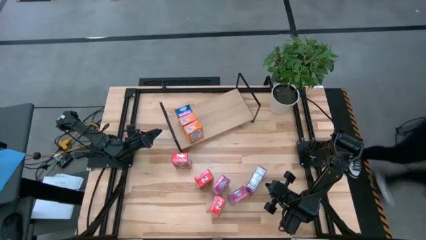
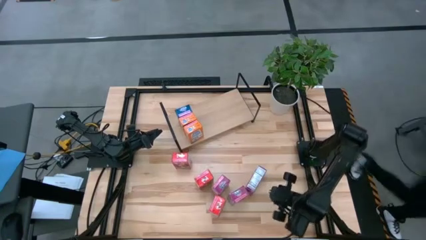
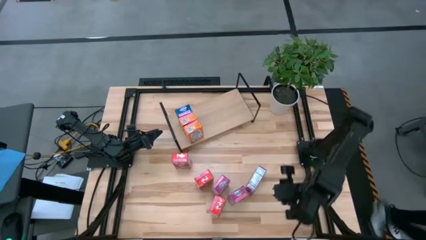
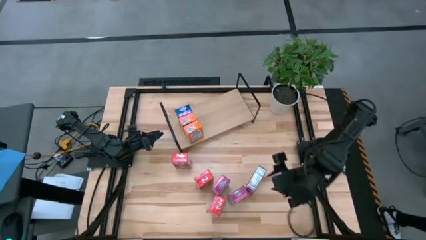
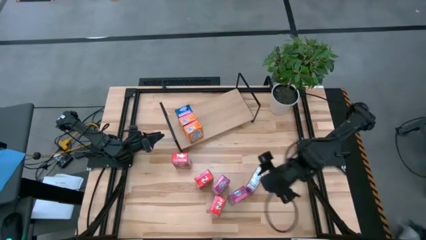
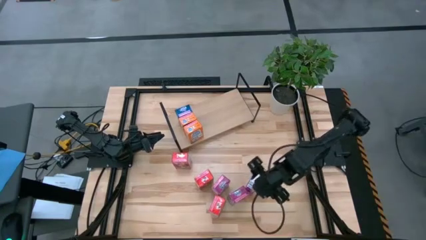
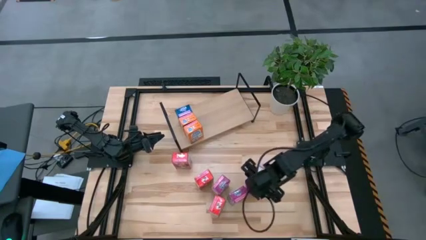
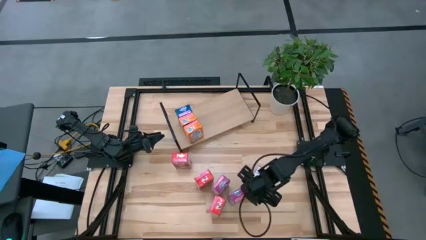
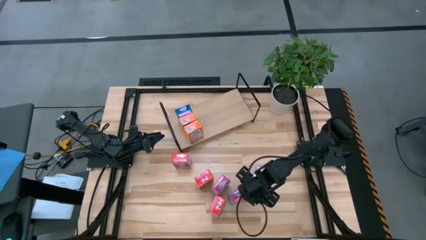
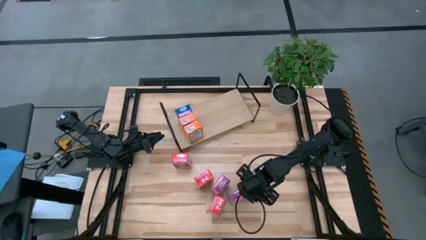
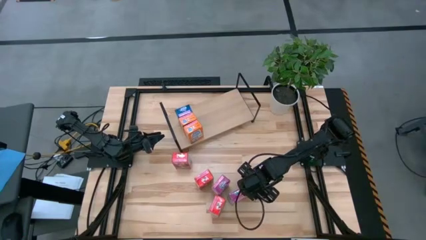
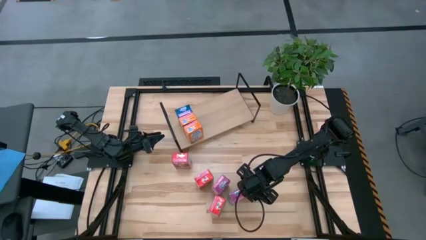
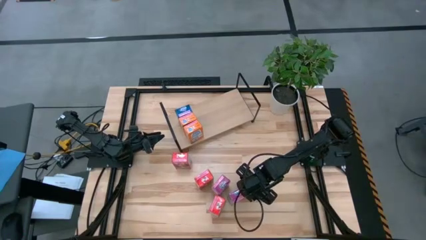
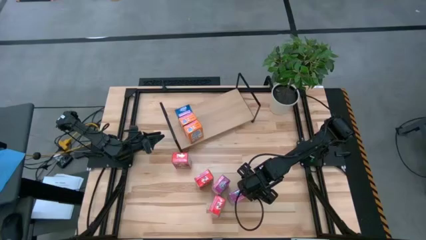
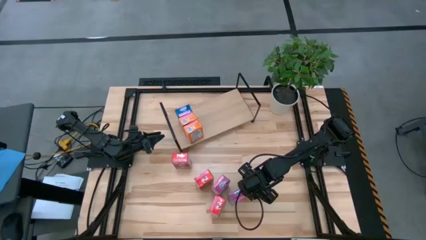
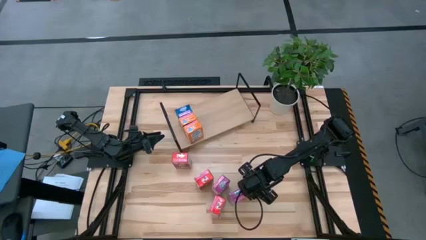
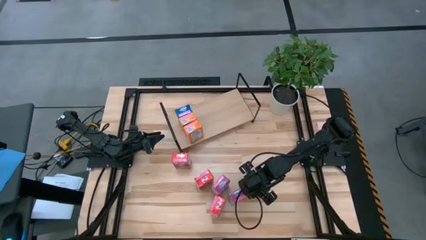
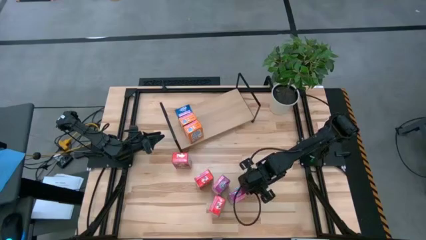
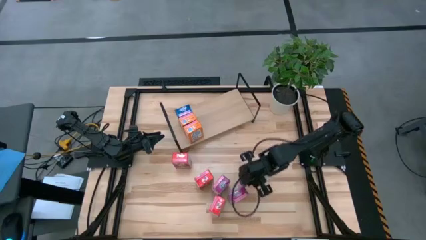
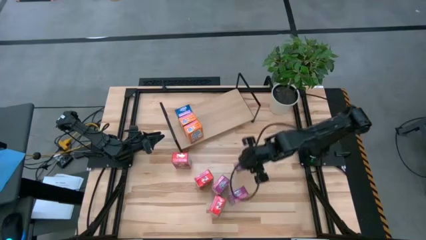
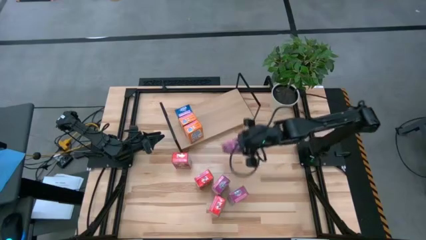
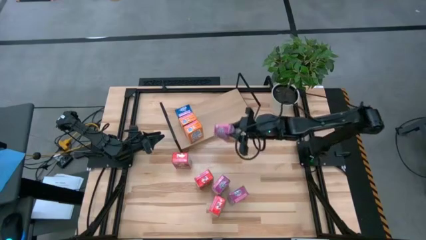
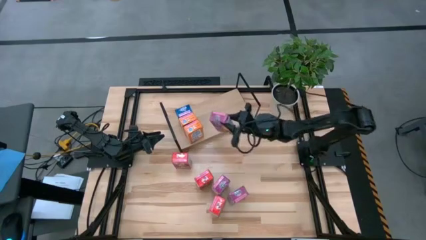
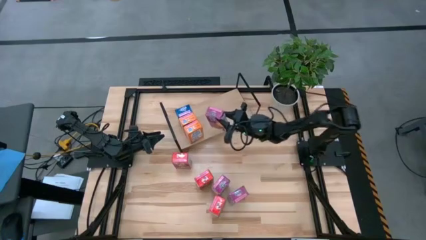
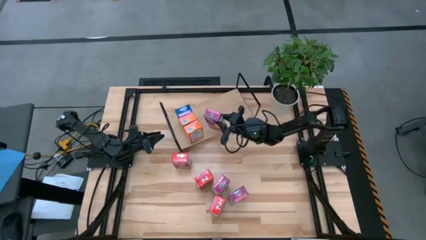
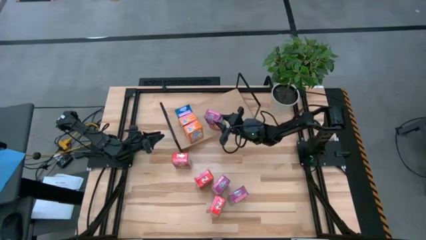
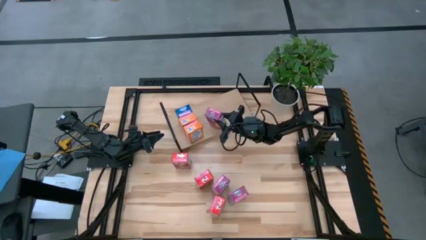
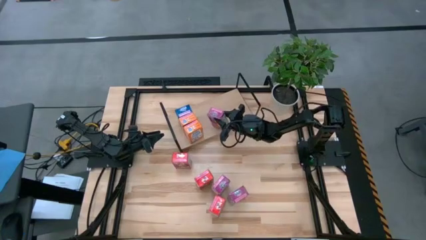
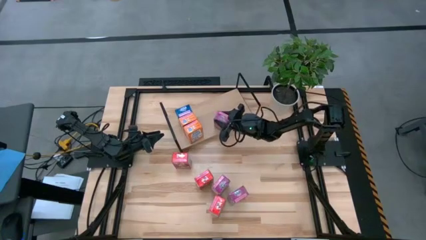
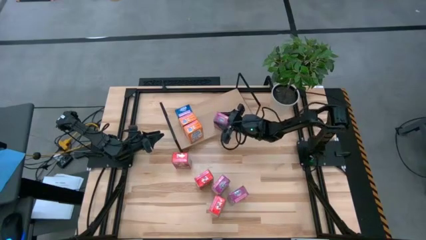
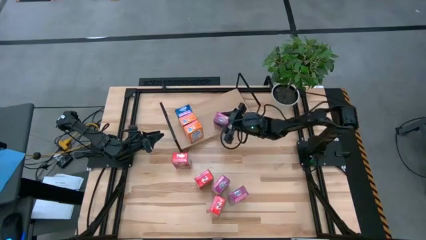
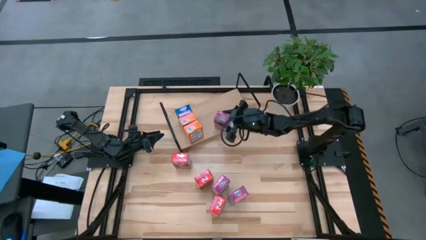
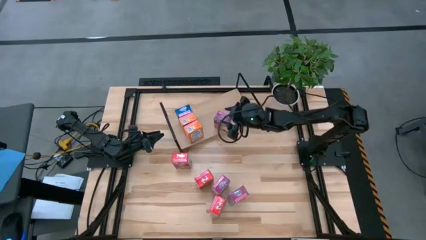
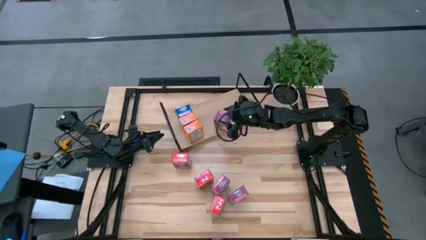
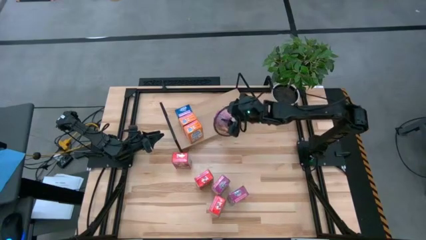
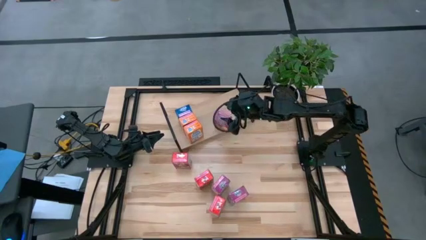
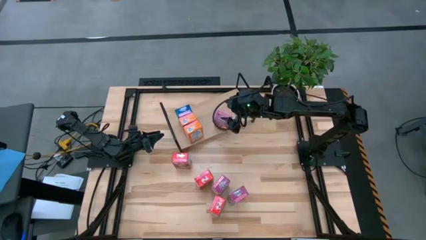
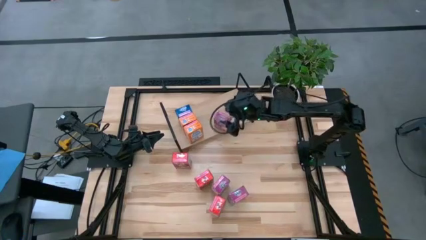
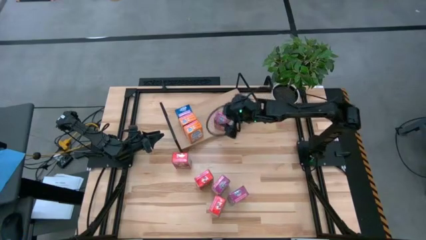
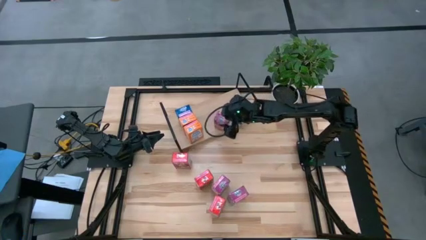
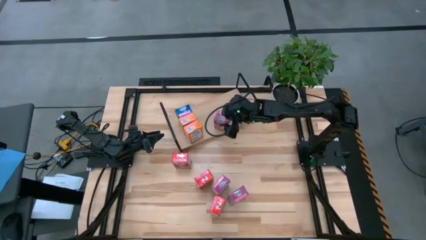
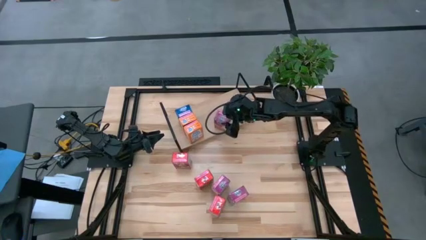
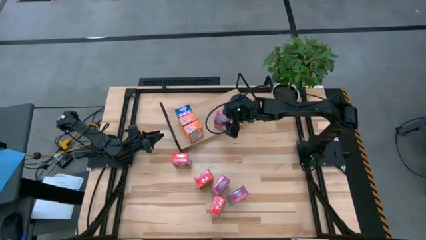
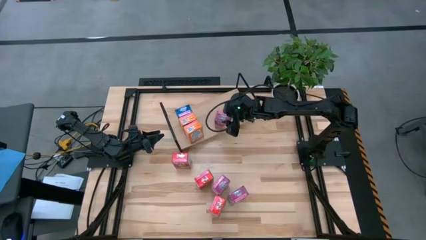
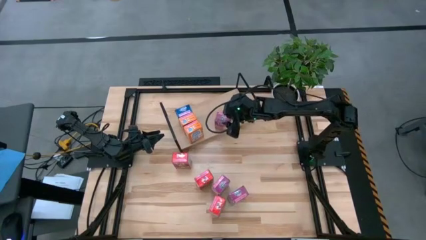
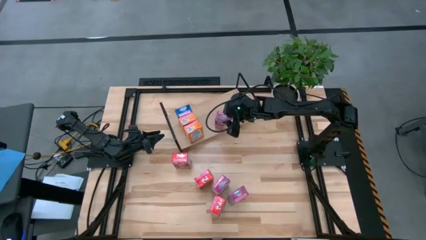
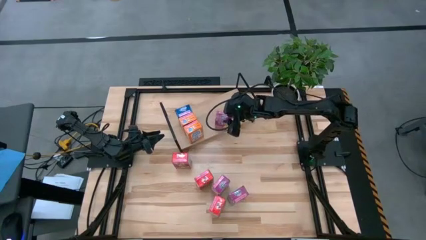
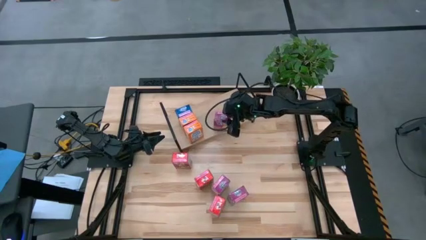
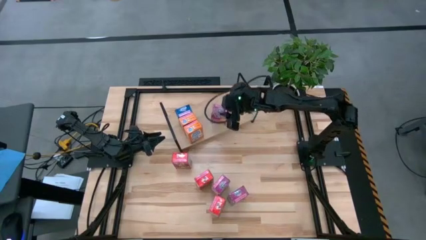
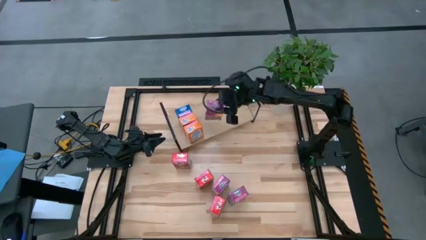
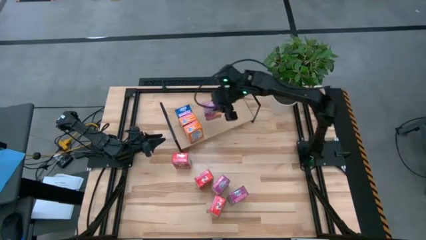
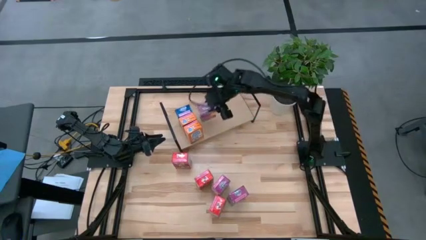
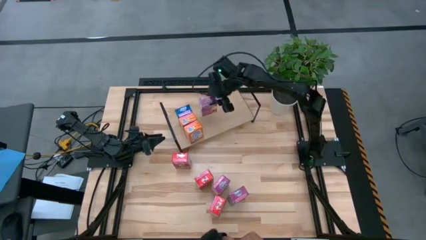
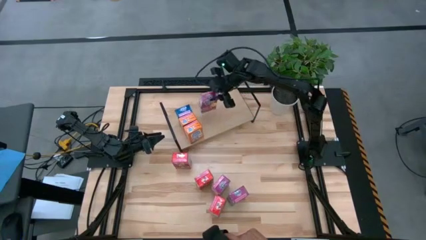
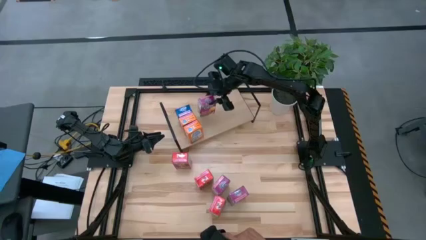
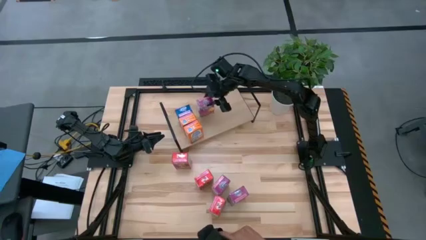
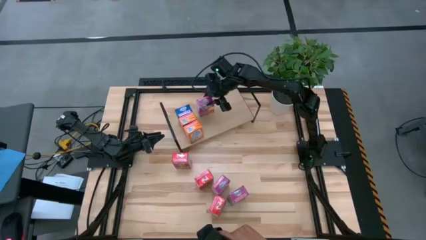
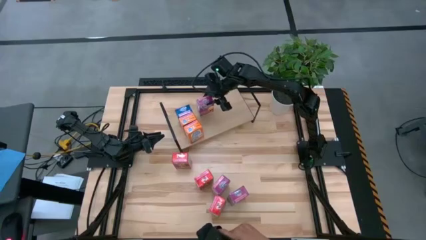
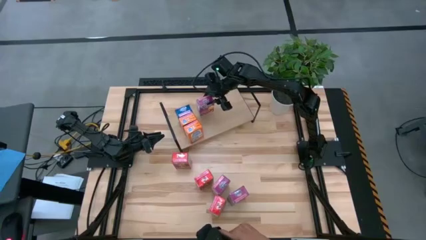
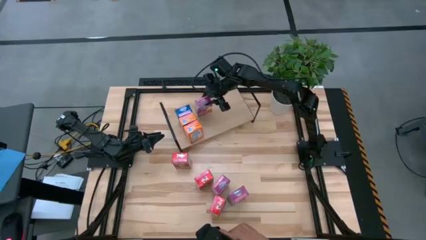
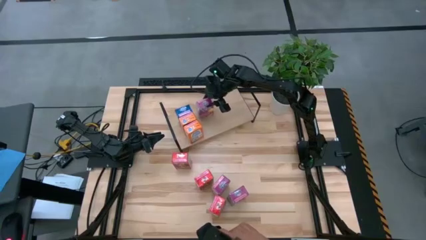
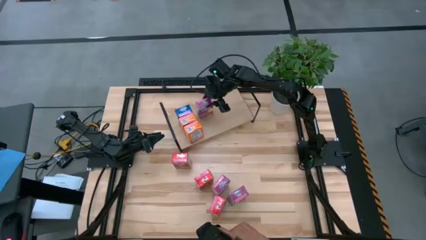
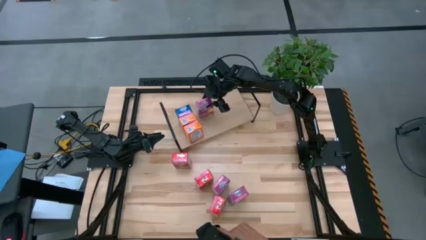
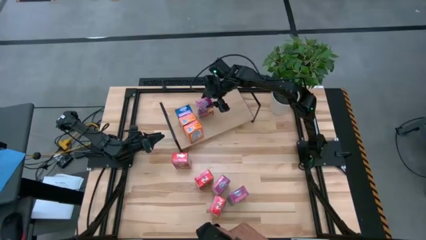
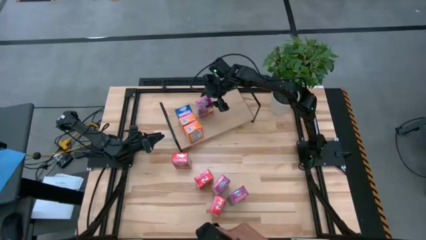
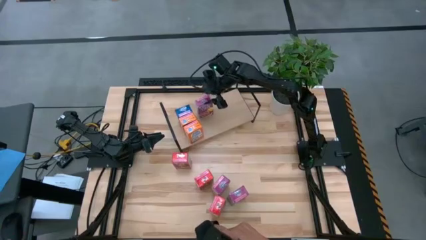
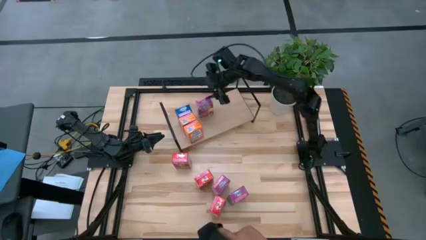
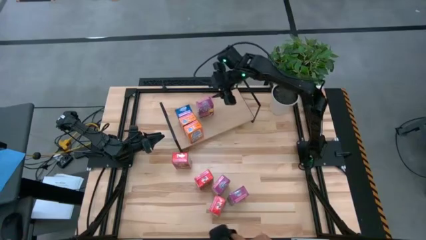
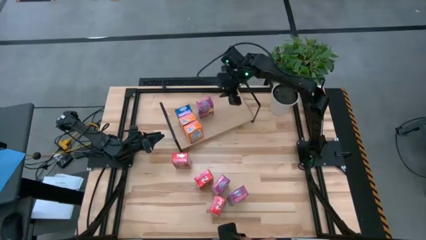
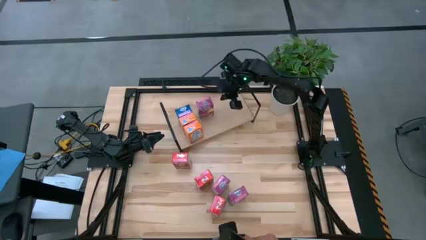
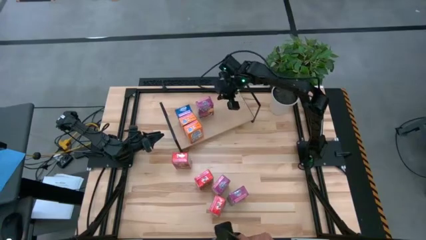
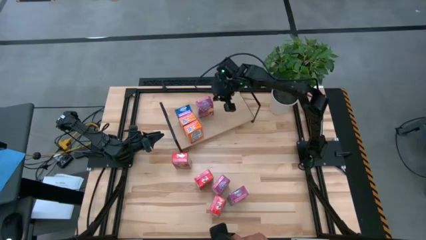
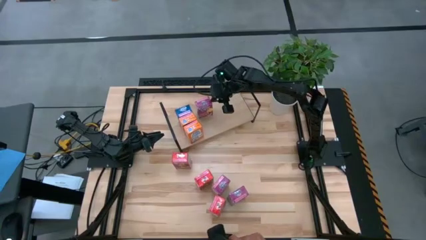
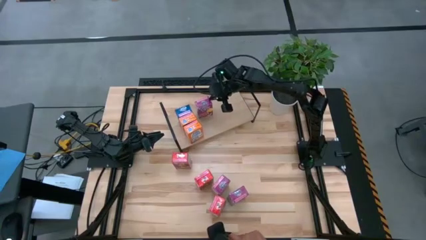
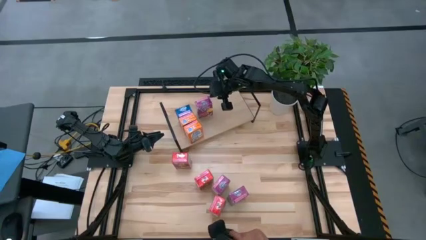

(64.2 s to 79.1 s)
Task: Stack cereal on shelf
Put the right purple cereal box on the shelf
